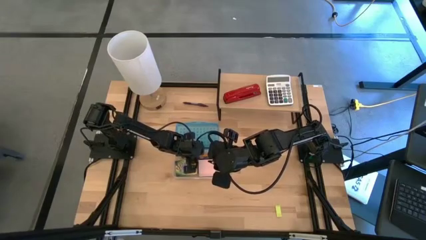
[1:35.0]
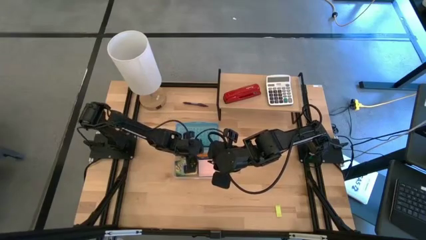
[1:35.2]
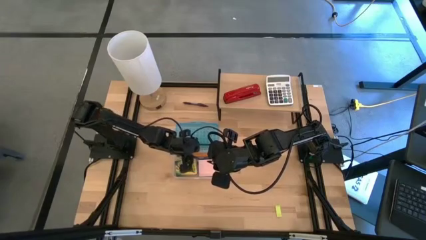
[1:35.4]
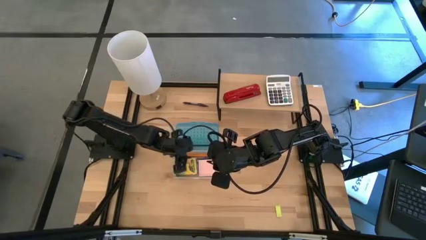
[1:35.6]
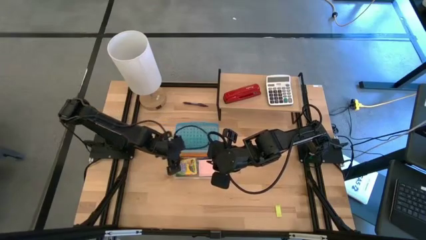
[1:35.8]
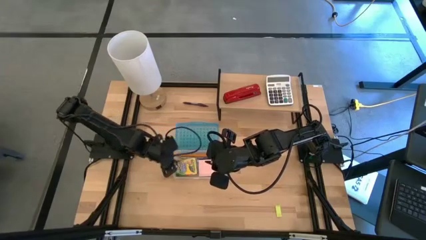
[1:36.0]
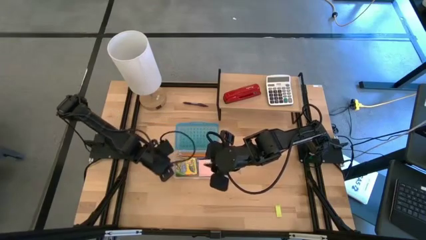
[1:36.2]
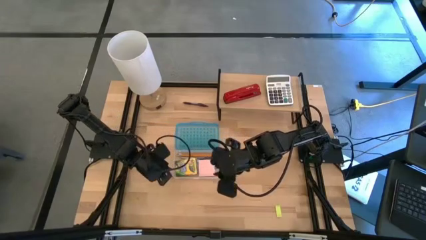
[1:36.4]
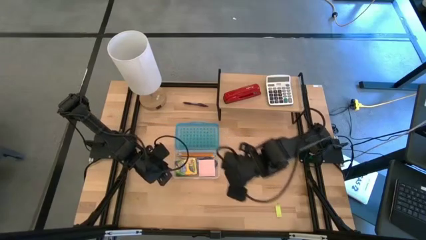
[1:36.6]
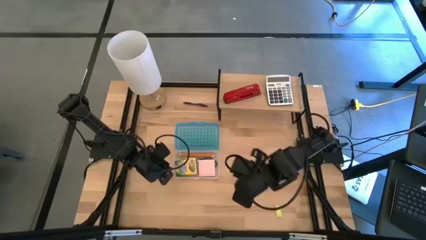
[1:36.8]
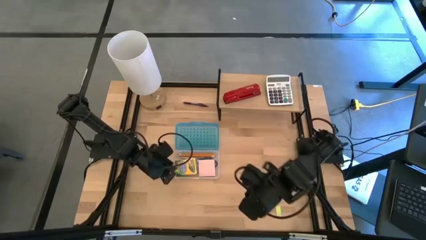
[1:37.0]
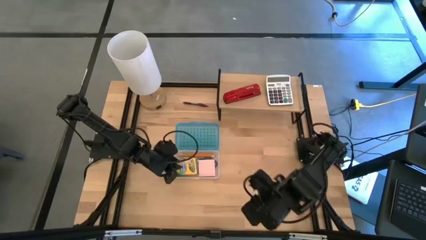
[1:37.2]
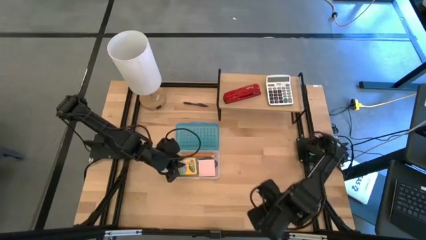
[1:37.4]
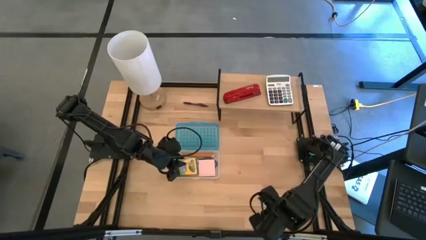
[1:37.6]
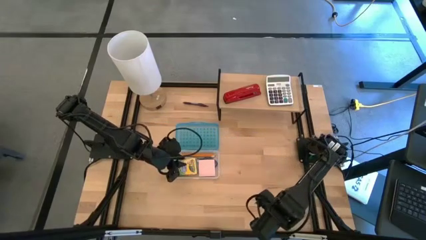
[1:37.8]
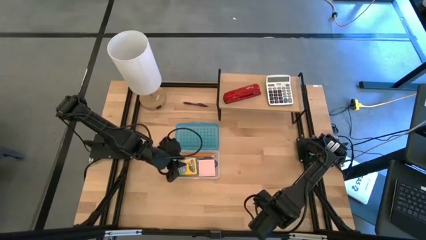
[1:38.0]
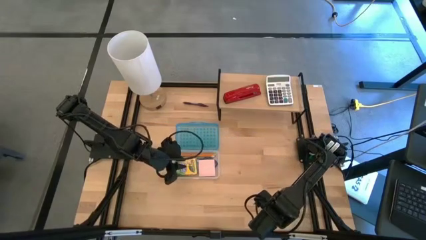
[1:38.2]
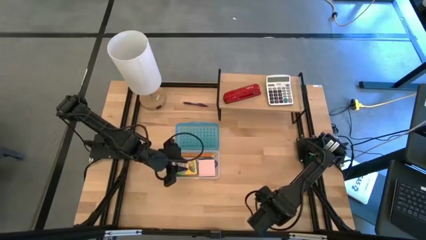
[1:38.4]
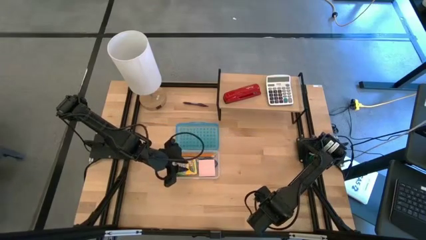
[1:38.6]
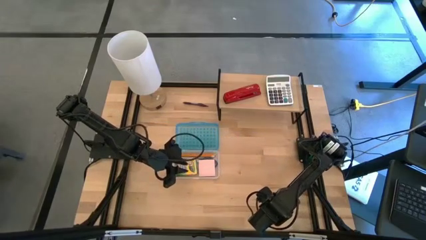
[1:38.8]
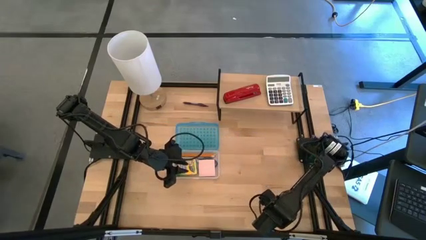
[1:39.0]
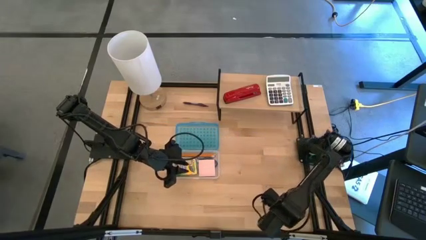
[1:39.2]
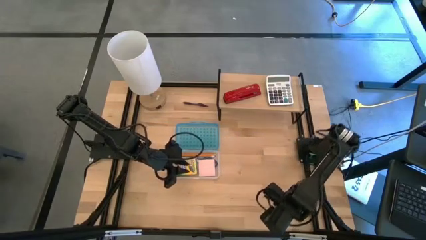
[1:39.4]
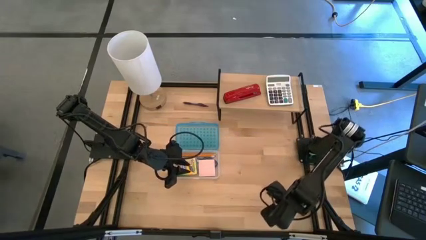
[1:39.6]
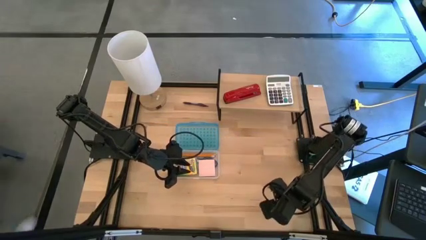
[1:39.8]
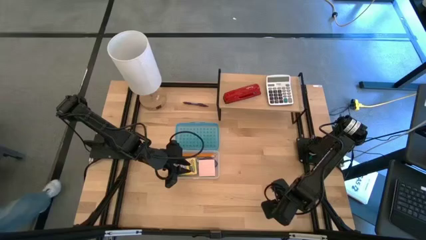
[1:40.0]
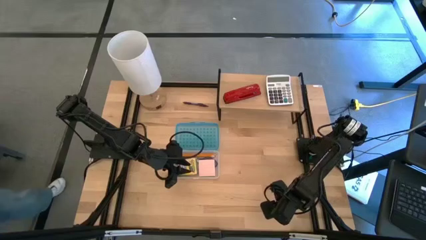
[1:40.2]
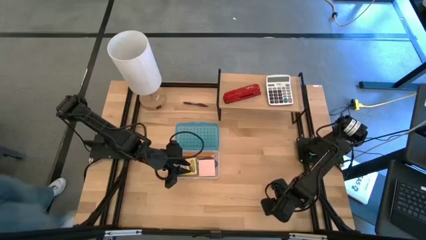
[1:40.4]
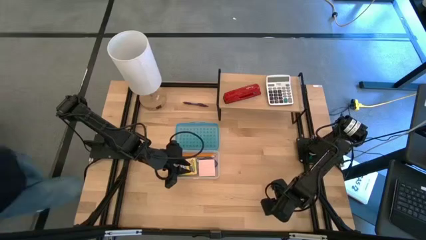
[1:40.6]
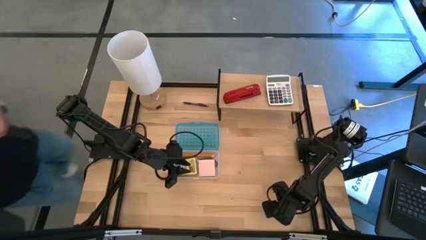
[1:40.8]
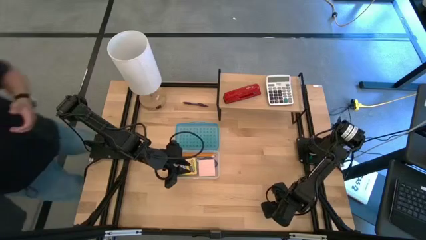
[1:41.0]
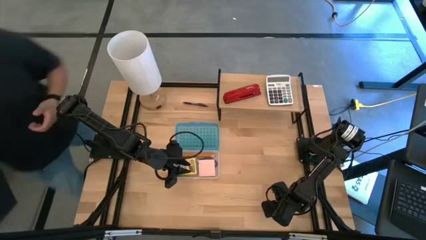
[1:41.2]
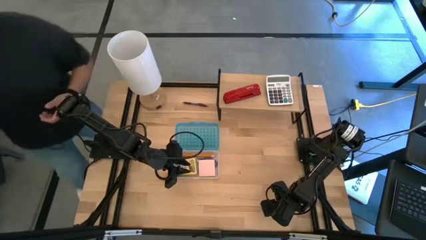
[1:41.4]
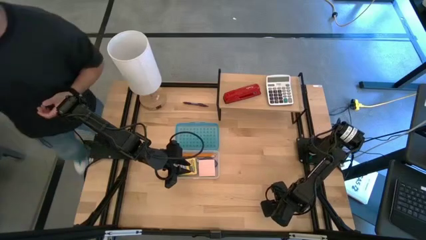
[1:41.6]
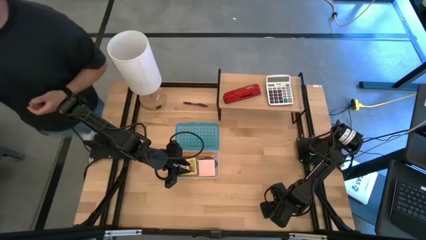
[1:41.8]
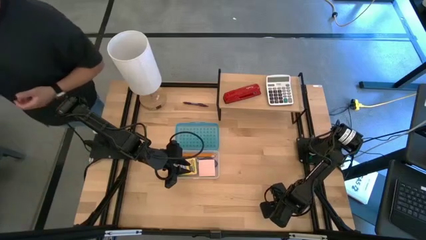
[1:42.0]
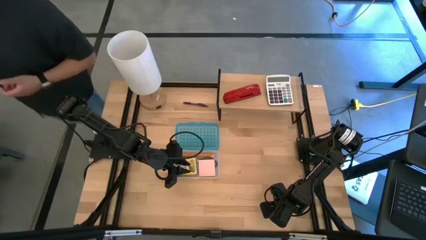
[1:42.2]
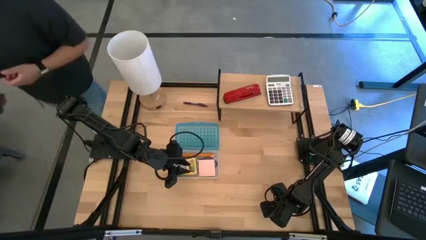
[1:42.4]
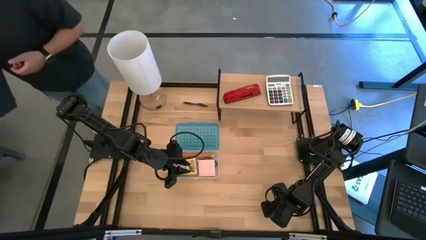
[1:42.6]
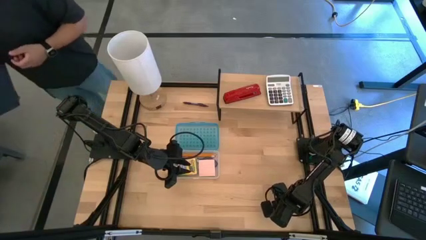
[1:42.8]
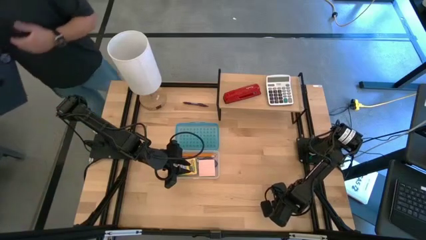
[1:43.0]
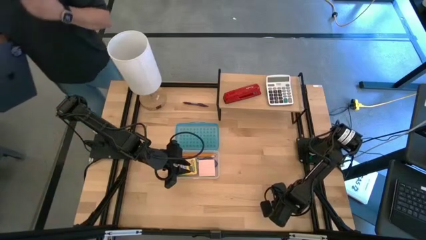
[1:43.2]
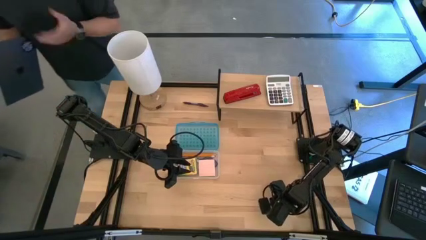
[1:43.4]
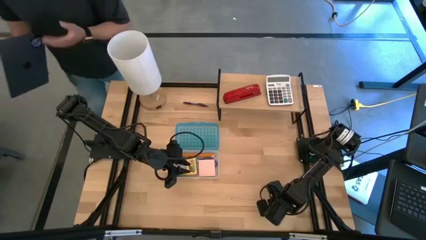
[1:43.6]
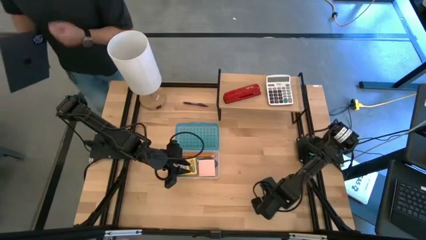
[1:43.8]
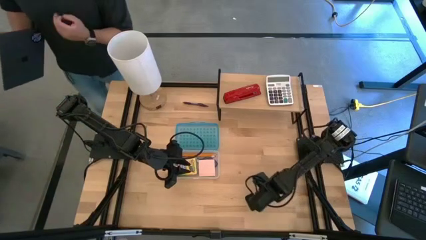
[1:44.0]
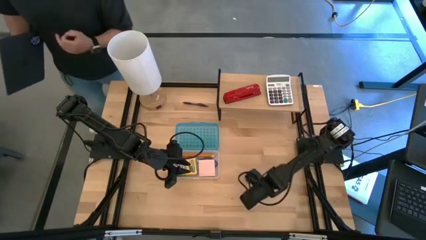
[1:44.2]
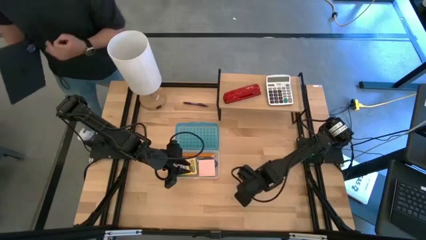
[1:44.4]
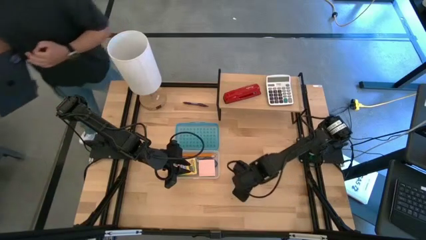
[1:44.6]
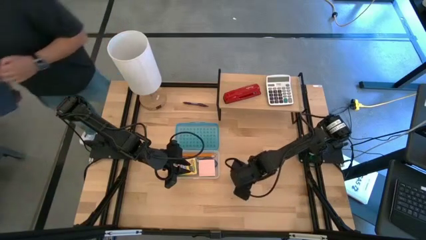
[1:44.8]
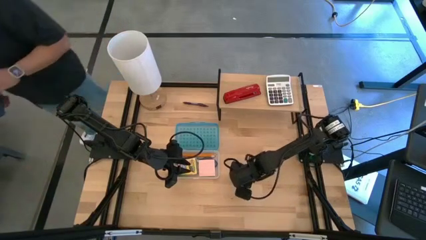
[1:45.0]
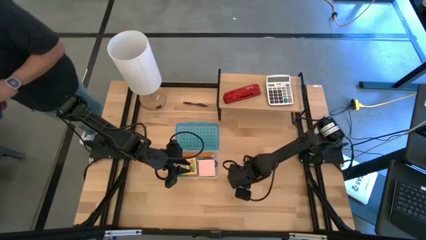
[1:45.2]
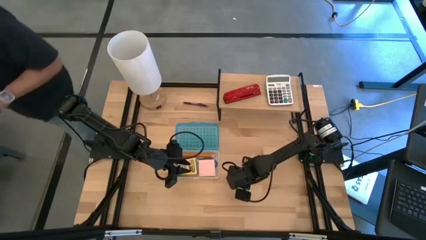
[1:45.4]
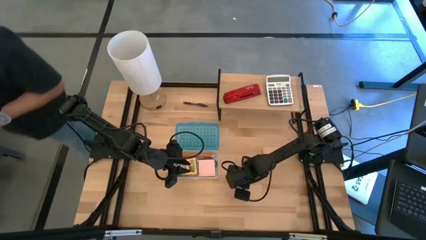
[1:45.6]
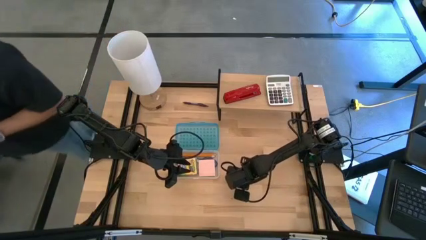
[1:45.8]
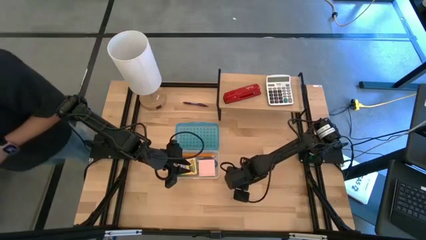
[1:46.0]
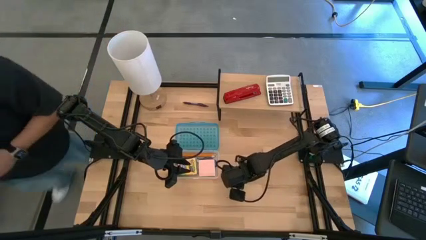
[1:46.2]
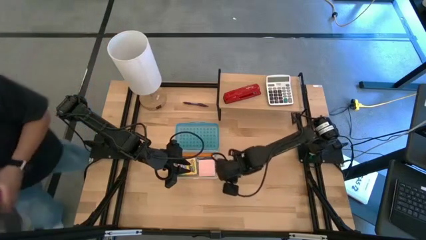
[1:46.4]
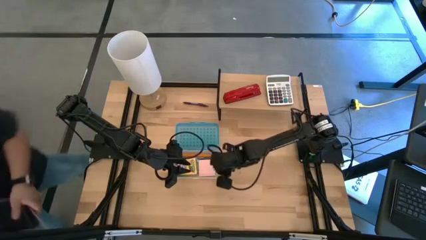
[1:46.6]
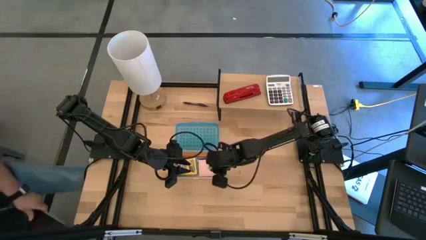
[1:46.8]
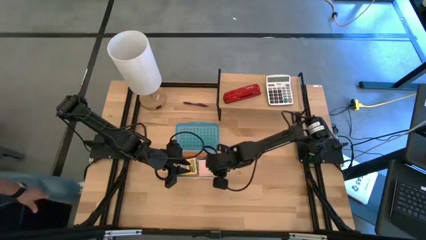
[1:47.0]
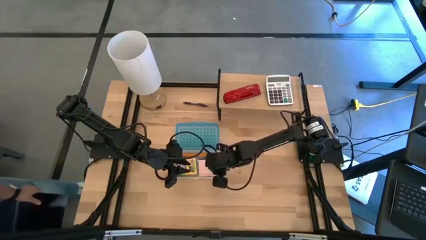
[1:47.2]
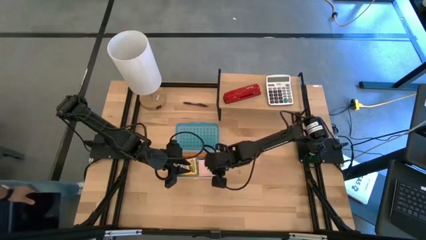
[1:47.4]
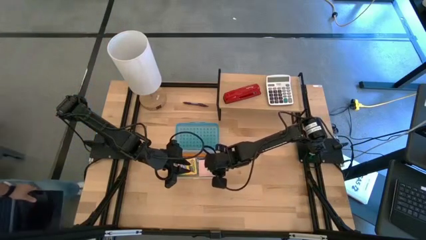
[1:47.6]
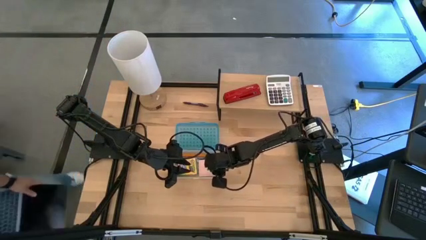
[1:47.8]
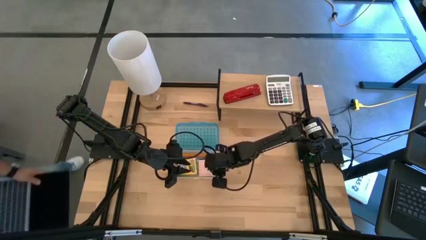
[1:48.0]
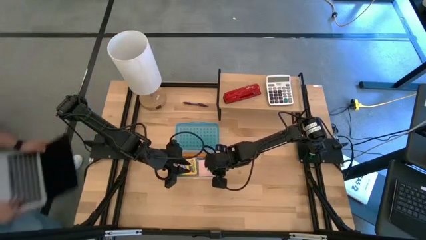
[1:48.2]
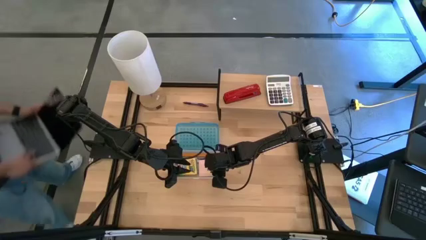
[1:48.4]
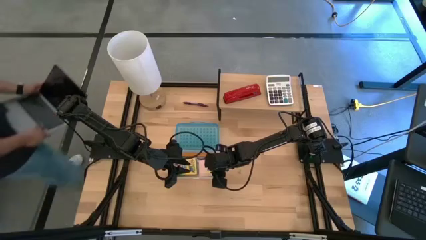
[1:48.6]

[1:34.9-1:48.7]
Task: Pack school essentials
Put the yellow eraser into the blue supply box

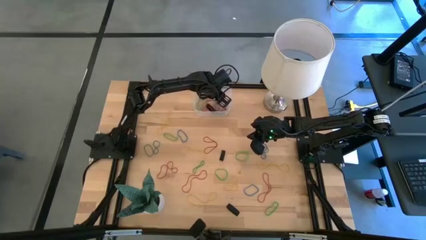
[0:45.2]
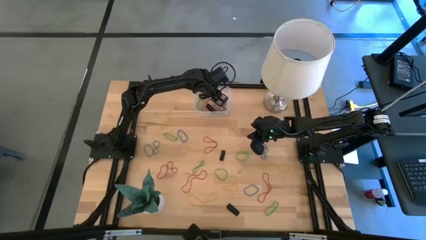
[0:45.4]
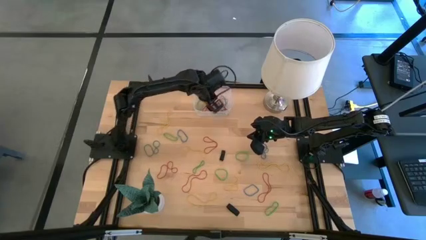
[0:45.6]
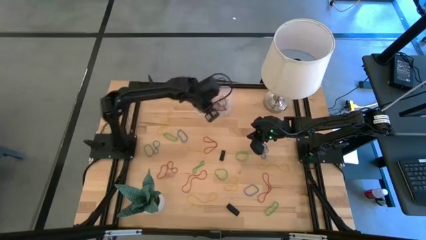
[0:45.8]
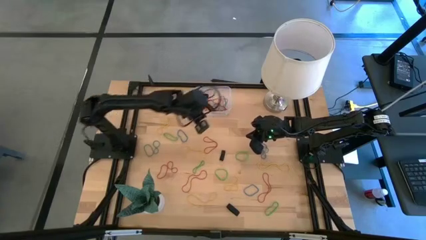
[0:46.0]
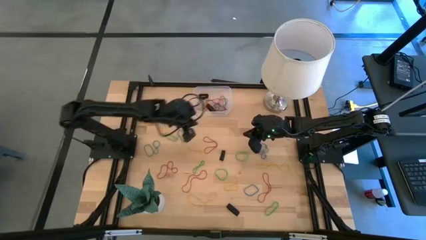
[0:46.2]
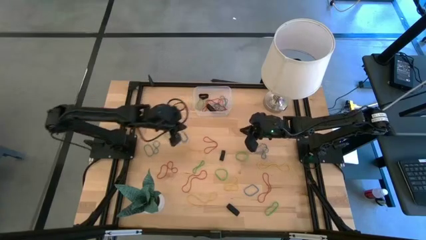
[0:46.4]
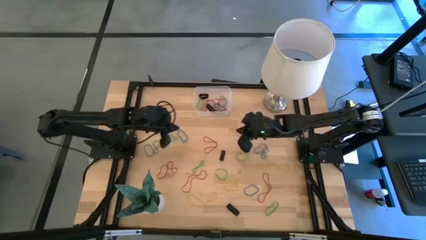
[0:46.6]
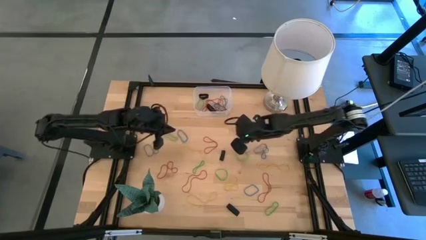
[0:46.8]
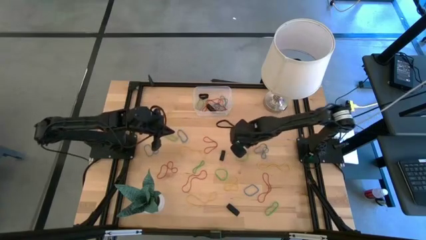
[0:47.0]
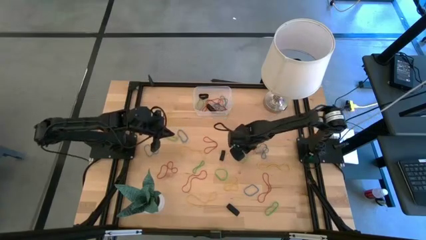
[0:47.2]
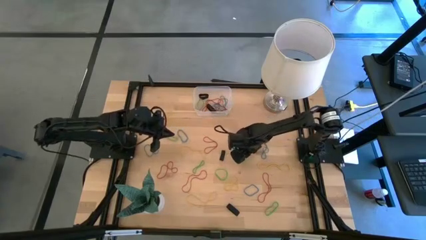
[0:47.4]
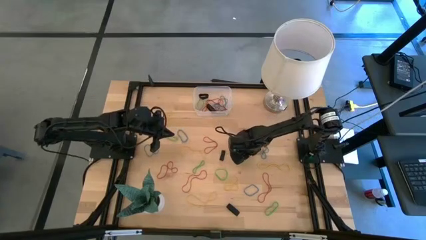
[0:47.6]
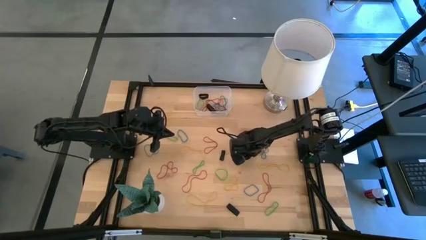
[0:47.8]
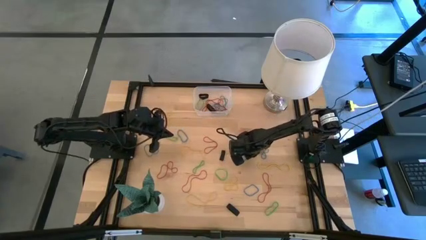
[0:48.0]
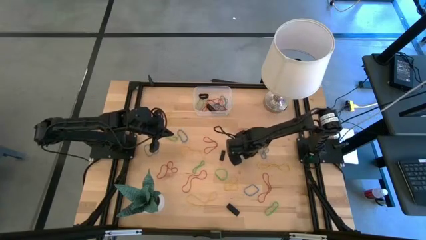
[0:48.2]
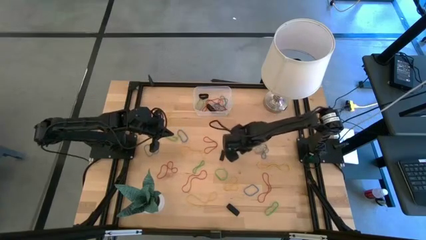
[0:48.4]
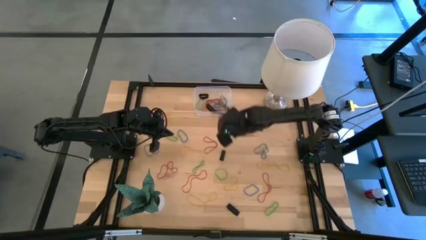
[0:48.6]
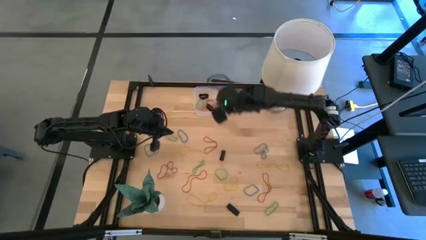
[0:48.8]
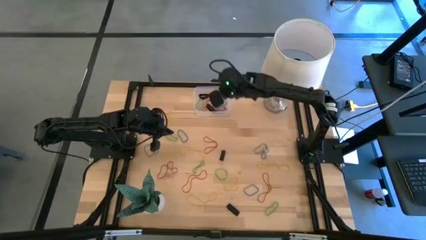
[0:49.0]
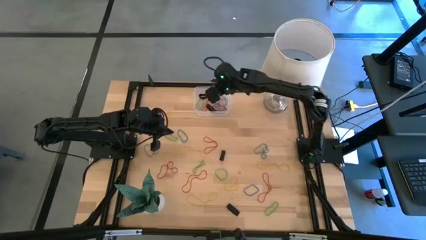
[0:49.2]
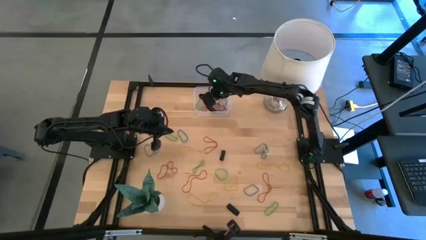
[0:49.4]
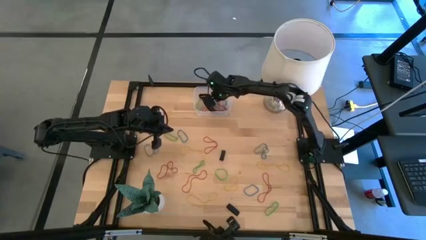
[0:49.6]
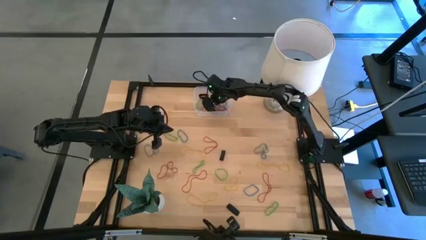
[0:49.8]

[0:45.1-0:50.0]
Task: Pick and place rubber bands into bin
Put the green rubber band into the transparent bin
